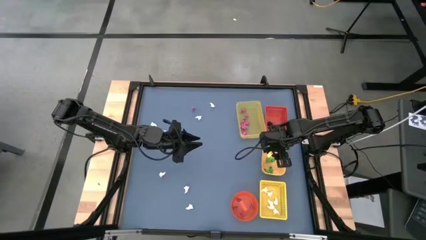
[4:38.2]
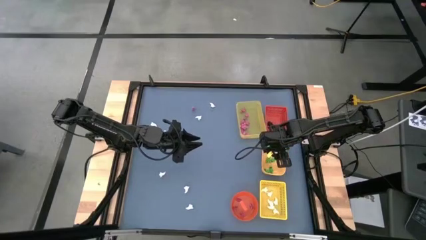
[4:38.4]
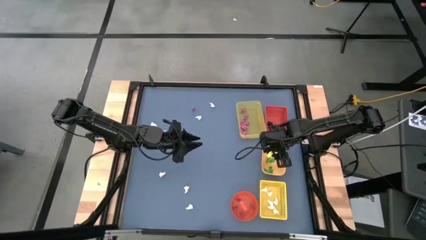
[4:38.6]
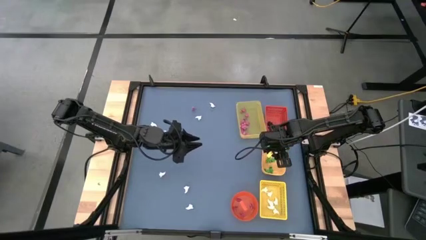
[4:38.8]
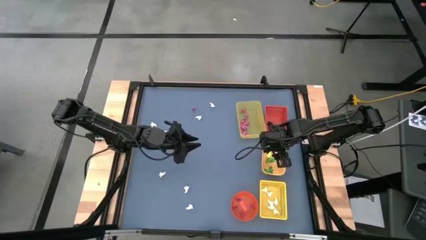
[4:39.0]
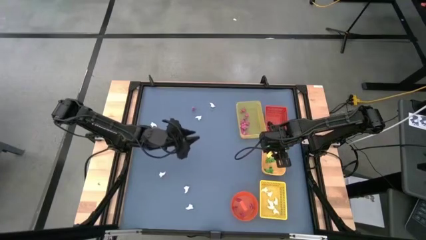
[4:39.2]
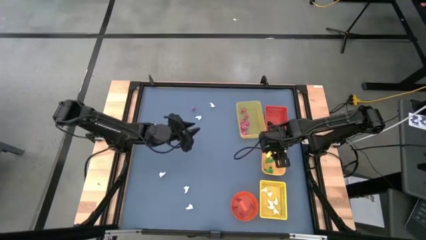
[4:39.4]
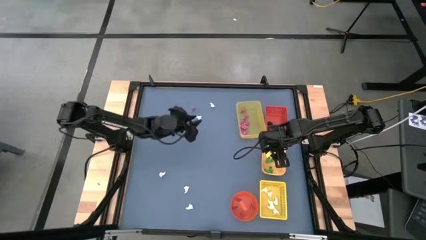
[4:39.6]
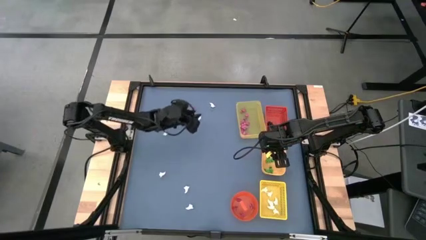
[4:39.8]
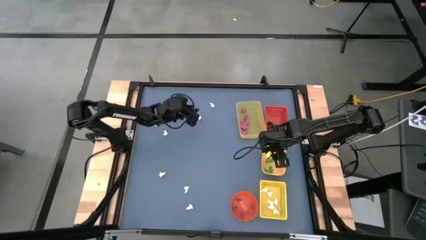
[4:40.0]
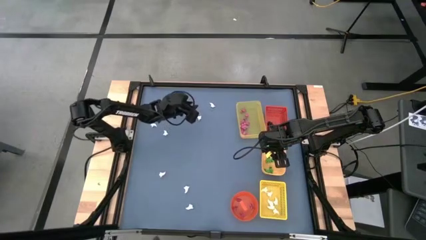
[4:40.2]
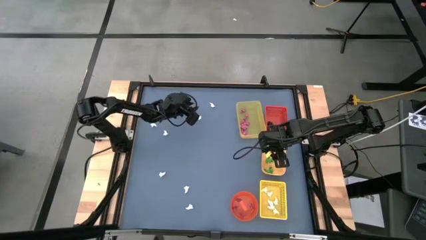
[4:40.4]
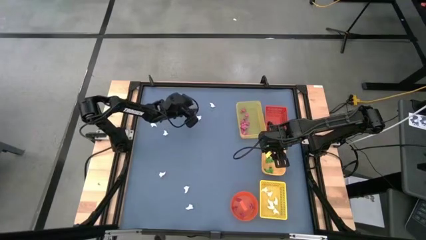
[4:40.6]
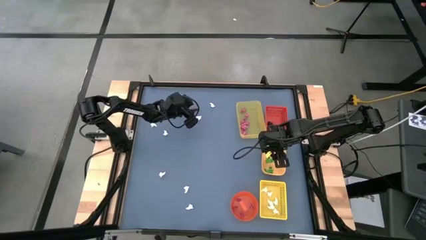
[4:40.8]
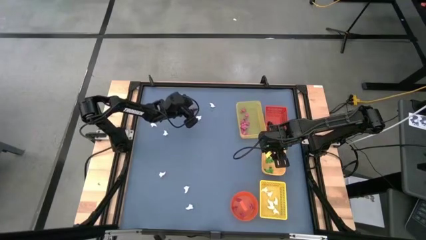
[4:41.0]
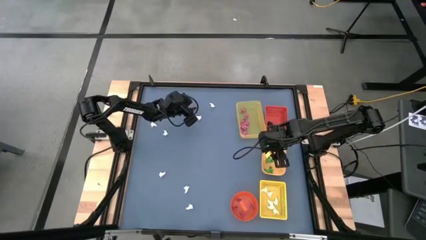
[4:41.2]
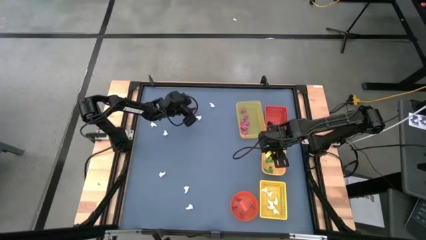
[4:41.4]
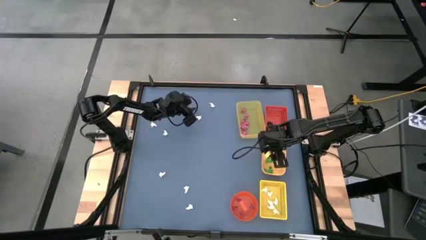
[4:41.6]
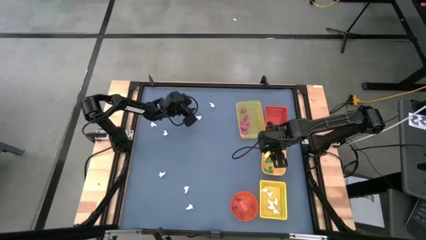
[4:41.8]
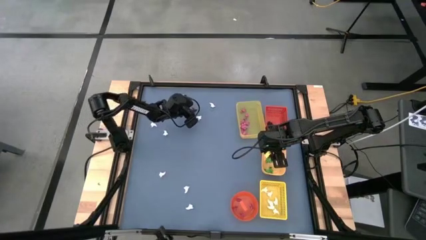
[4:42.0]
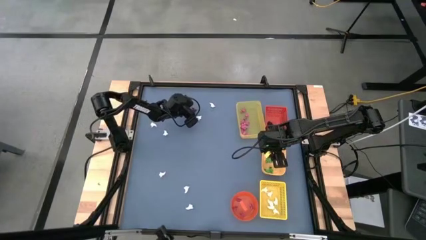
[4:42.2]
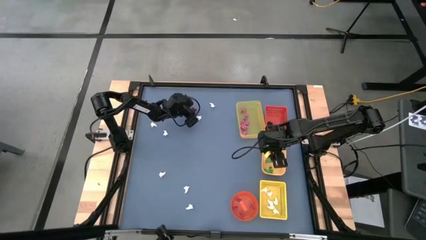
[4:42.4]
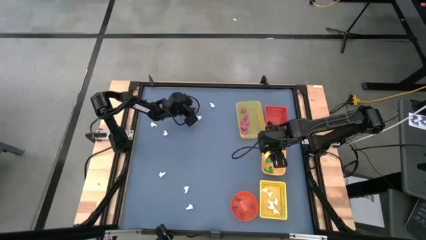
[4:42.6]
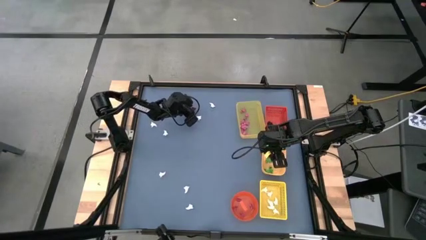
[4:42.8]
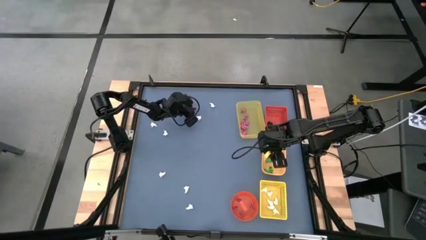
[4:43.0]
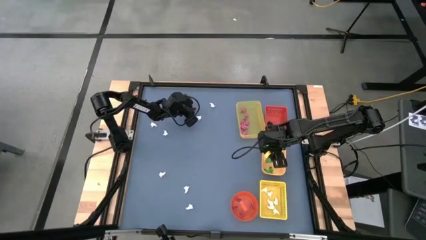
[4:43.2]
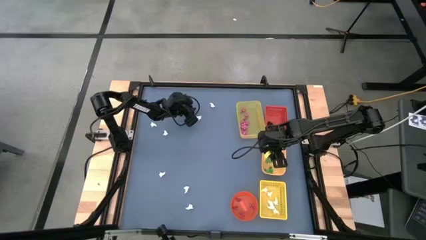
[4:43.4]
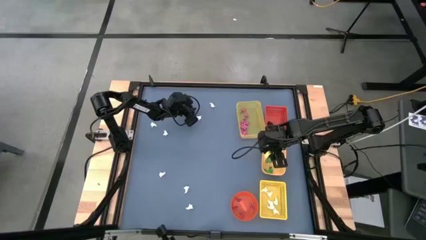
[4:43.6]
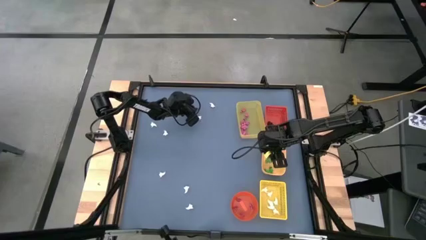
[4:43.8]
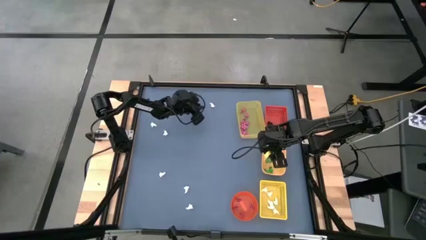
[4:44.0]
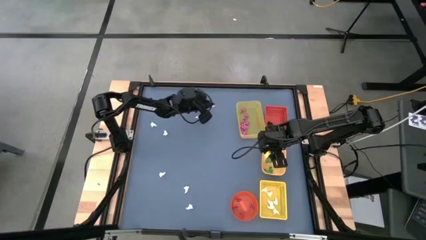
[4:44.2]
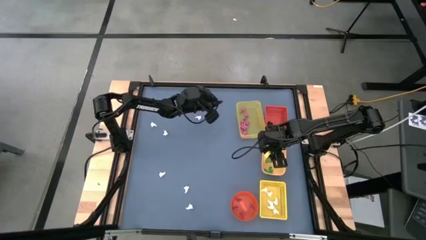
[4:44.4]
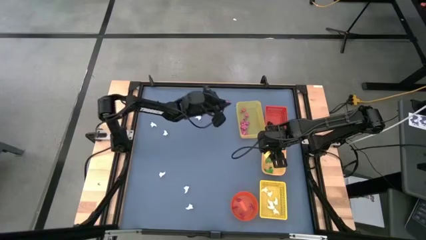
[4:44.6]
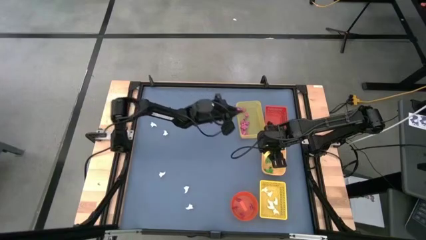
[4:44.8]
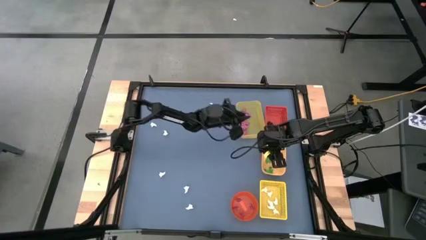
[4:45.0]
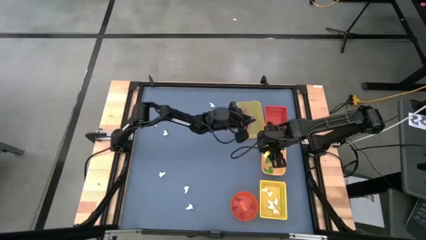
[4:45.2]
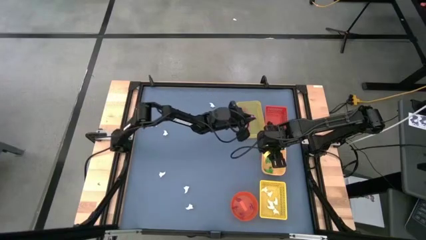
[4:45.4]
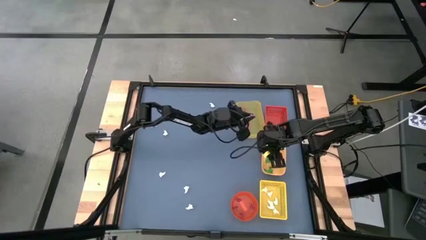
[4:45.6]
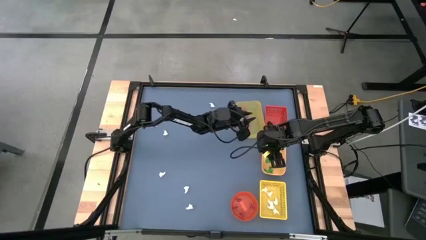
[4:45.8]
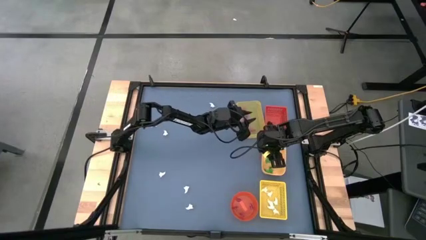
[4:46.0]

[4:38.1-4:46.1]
Task: Sort Halloween decoration
Put the pink skeleton toy into the top yellow bin
